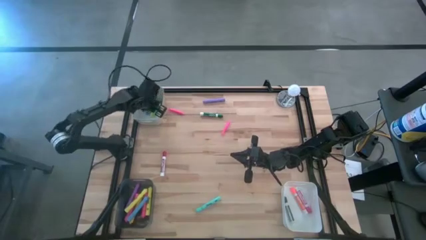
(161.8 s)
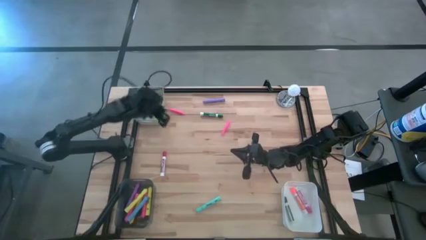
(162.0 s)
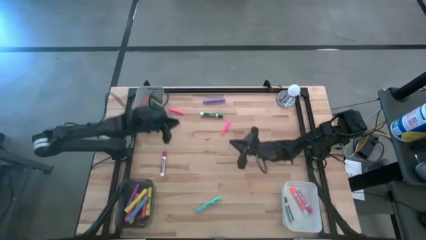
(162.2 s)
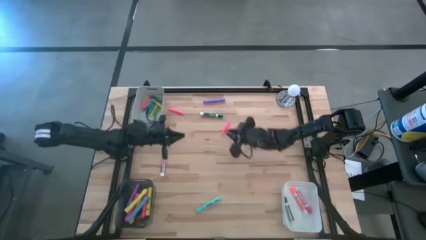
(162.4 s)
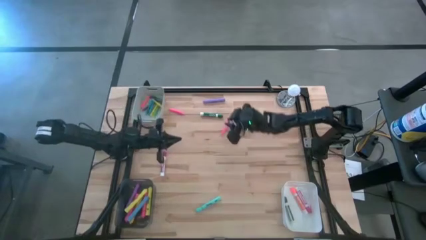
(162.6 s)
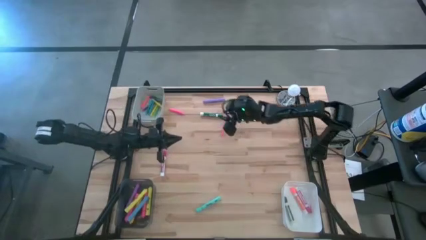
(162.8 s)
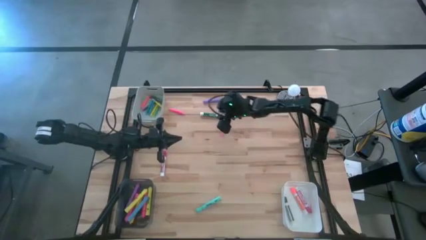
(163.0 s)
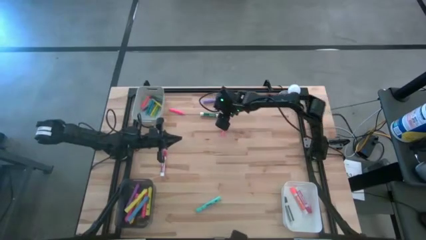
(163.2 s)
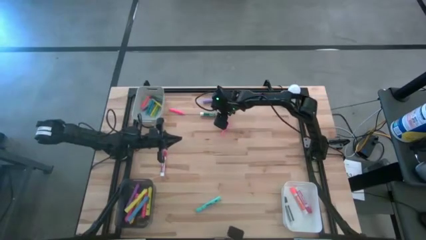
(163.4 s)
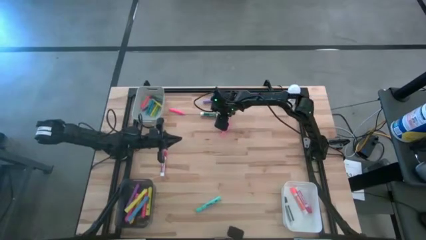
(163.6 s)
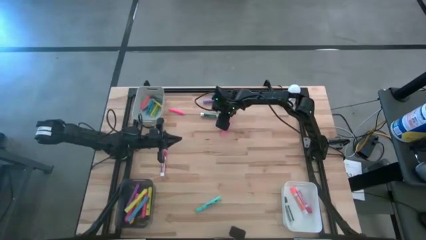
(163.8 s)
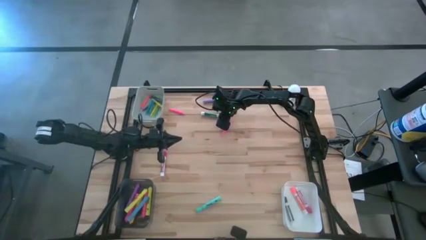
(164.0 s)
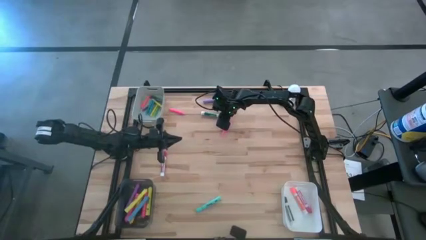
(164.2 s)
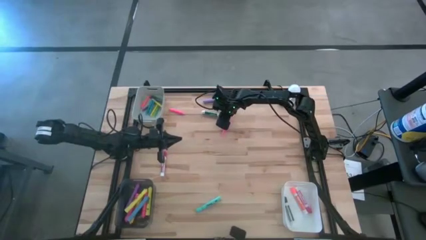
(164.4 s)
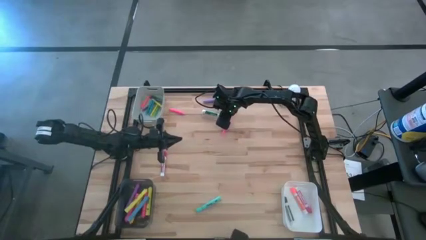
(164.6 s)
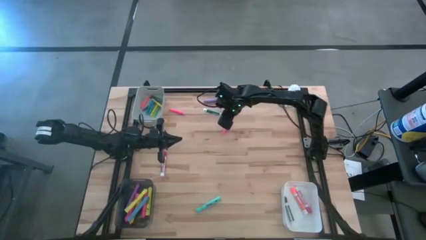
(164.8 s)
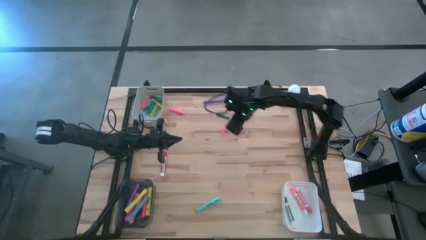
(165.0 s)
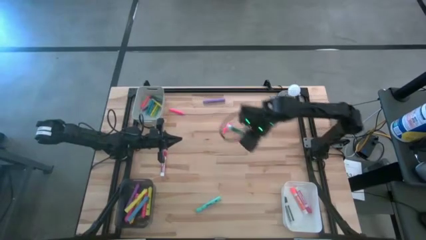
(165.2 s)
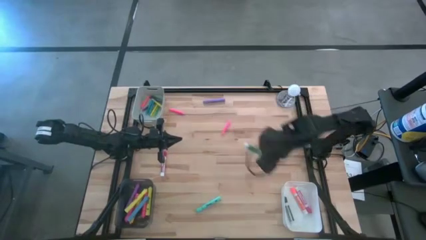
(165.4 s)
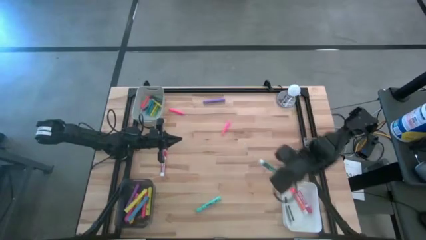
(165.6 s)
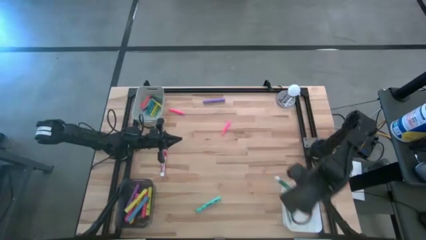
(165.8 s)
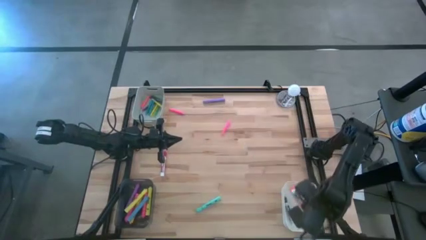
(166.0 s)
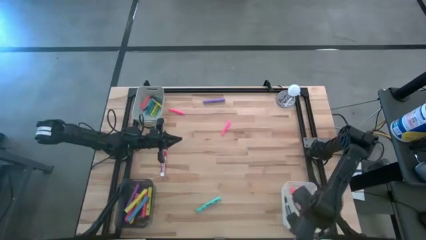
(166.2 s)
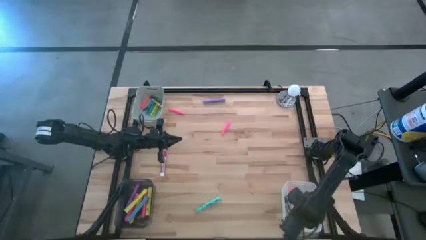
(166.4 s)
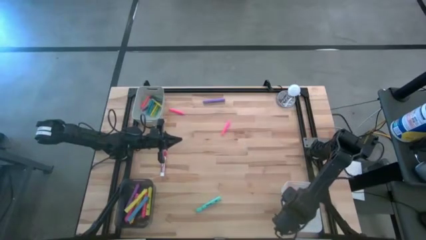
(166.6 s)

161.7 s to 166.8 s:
Task: Pick & Place Markers
Put the green marker pen into the white bin

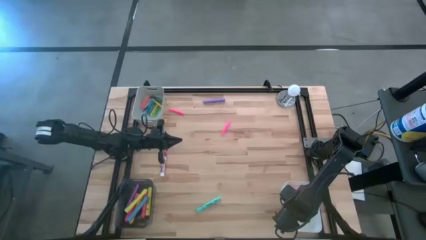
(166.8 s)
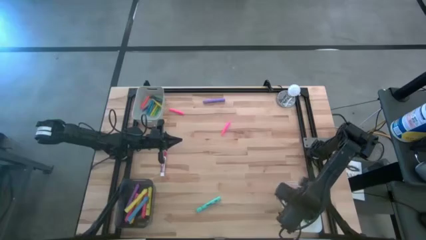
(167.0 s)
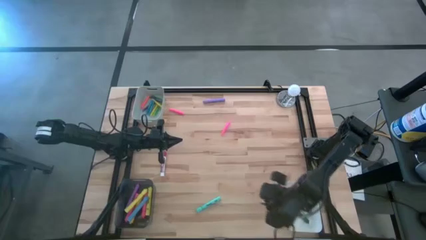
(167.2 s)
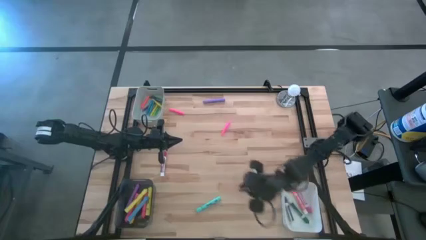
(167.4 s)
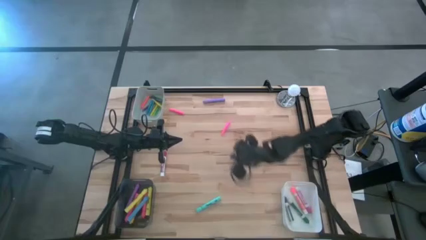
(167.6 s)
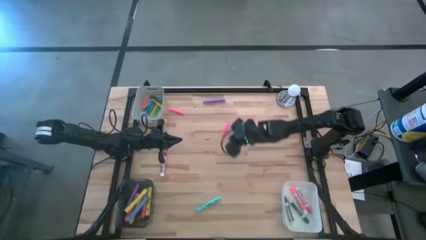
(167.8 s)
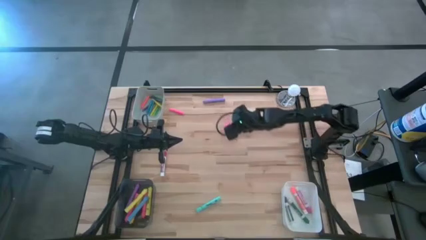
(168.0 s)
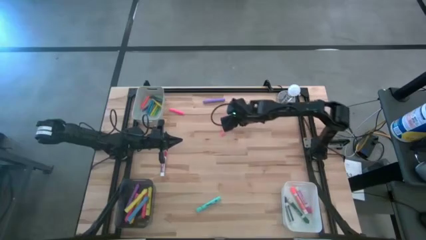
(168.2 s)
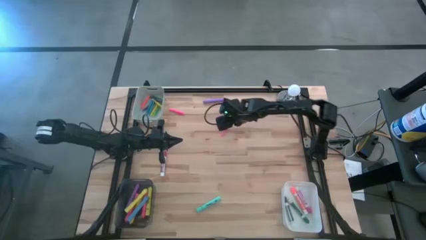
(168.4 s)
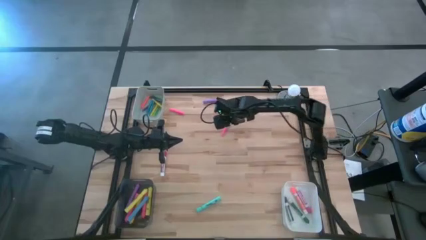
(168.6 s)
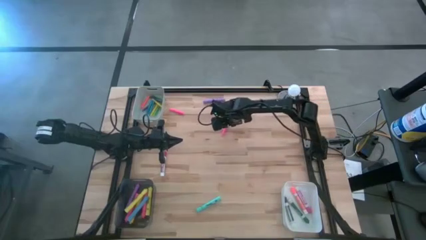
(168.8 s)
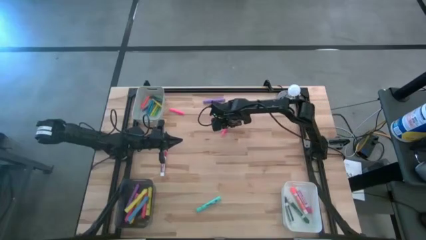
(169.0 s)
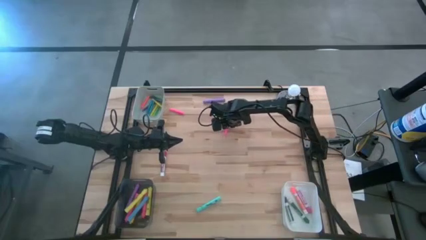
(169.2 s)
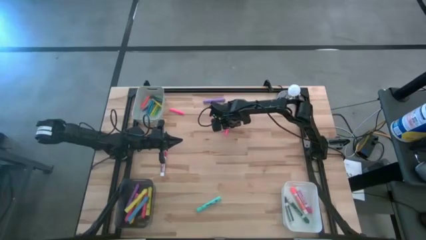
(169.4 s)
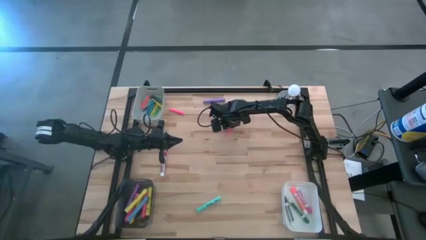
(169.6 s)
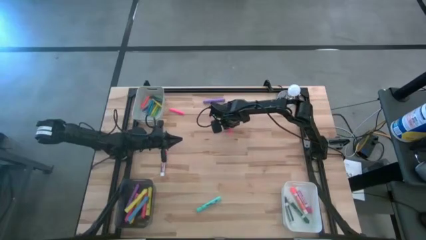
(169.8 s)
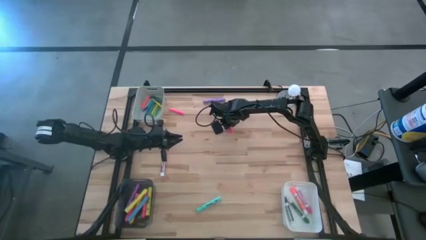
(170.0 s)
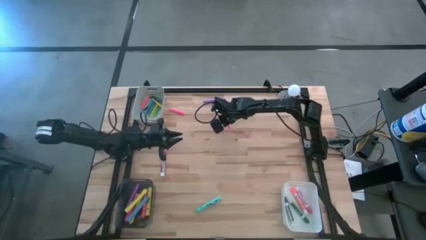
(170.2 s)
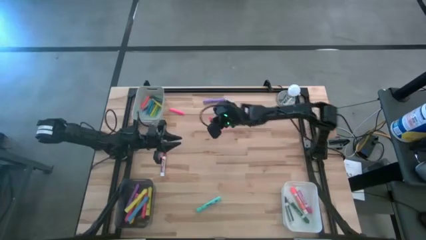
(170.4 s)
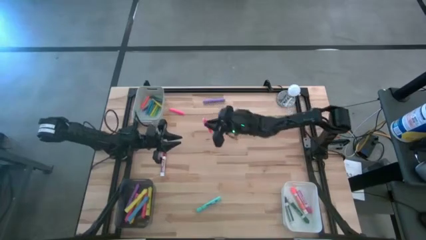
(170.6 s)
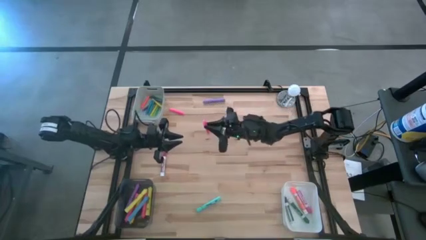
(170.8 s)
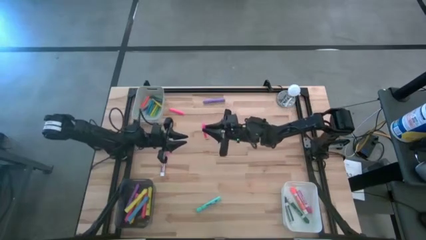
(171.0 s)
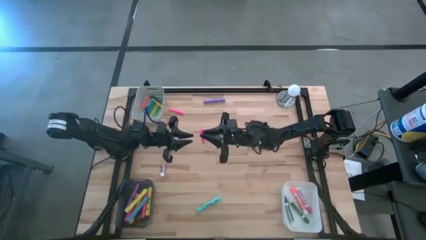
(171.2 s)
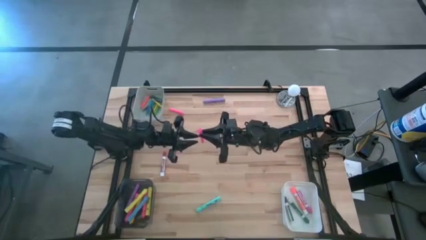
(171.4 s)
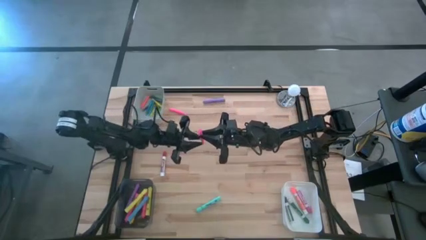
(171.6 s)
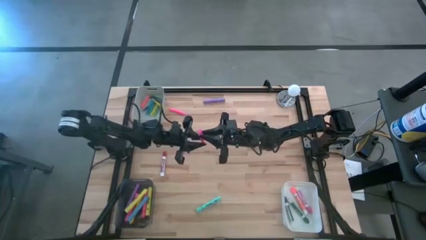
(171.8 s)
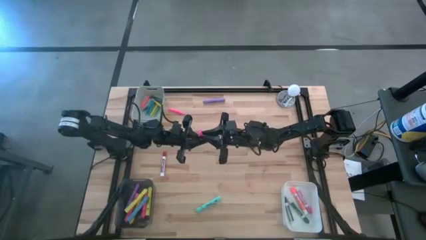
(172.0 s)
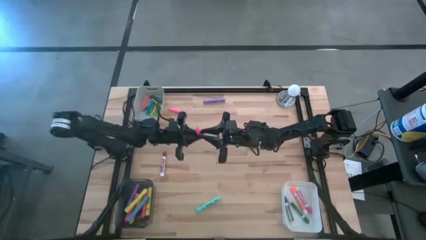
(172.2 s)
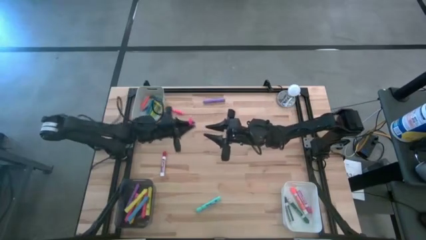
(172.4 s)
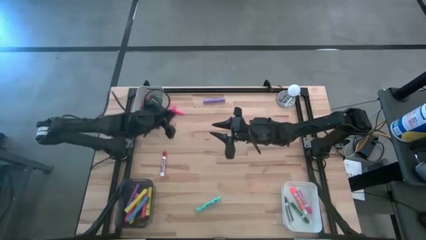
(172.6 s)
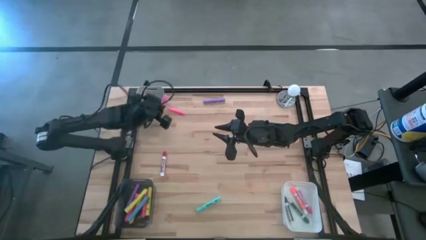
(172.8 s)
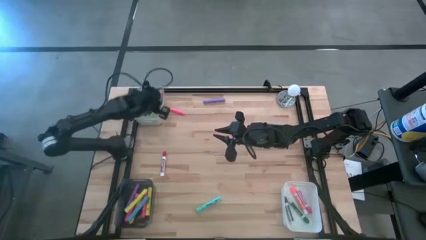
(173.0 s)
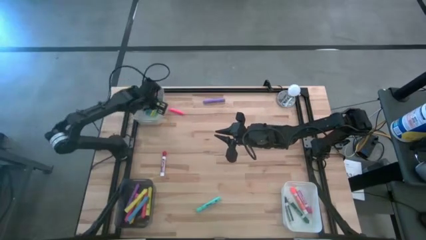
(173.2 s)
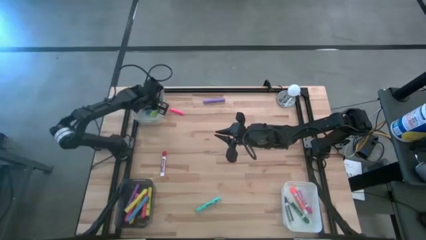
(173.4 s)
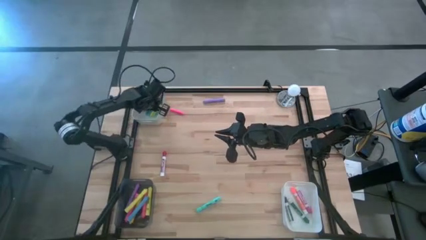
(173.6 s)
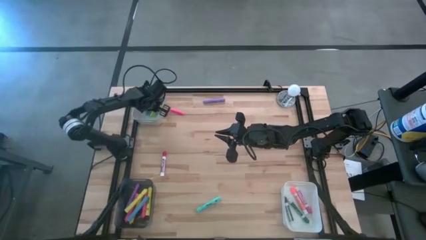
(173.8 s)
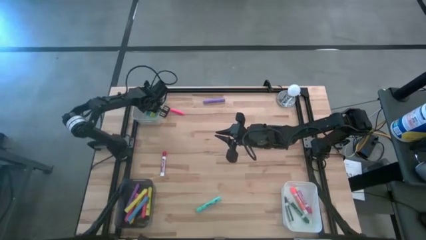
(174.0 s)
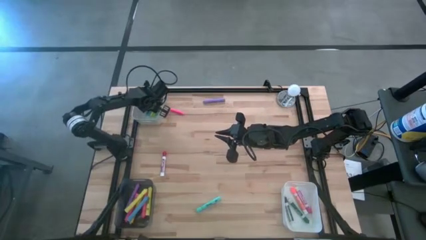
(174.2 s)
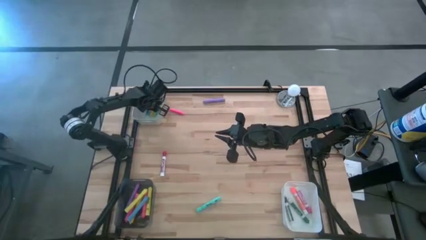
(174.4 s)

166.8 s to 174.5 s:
Put the pink pen into the gray bin

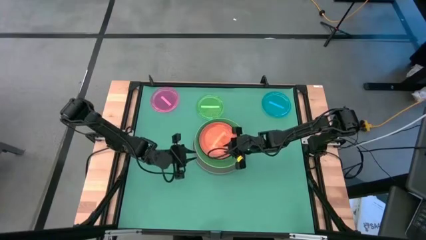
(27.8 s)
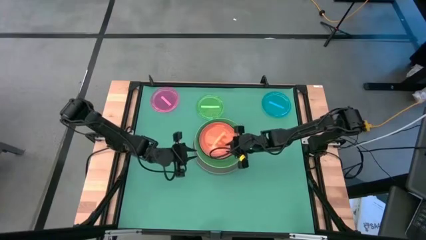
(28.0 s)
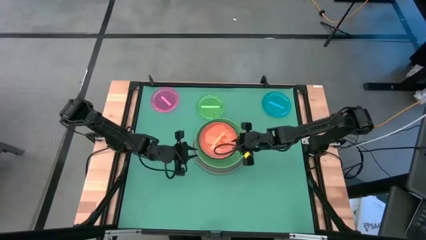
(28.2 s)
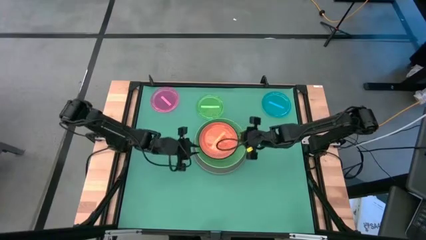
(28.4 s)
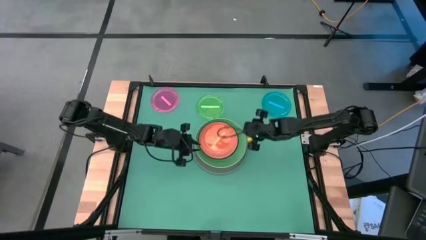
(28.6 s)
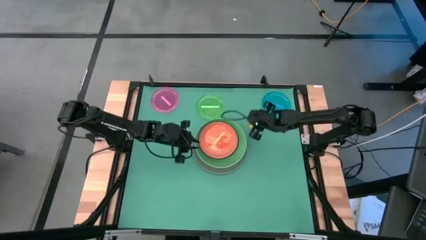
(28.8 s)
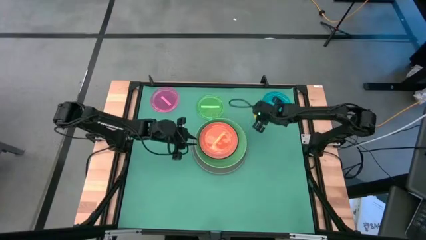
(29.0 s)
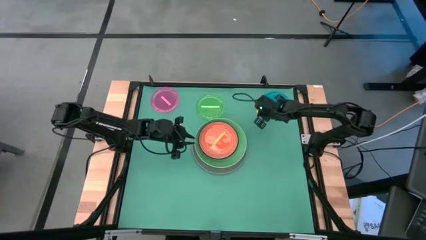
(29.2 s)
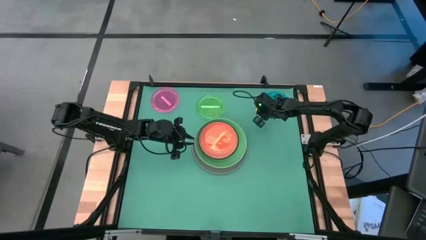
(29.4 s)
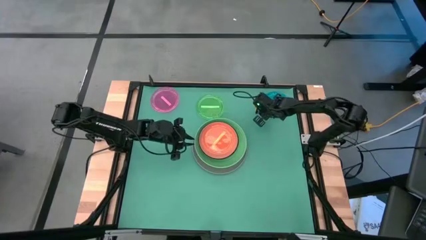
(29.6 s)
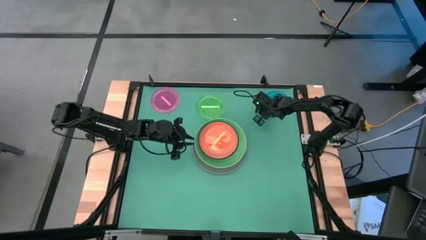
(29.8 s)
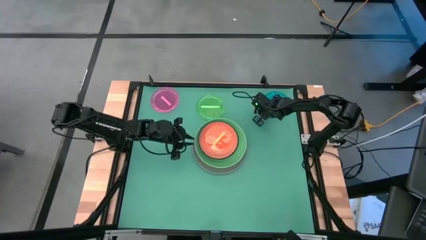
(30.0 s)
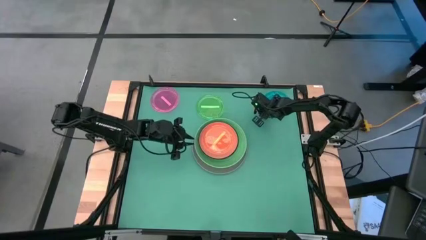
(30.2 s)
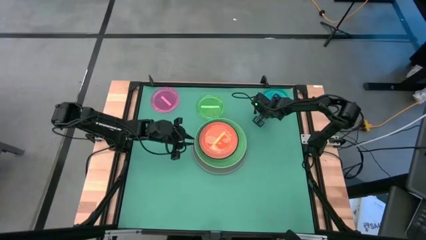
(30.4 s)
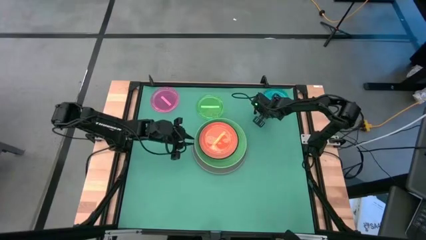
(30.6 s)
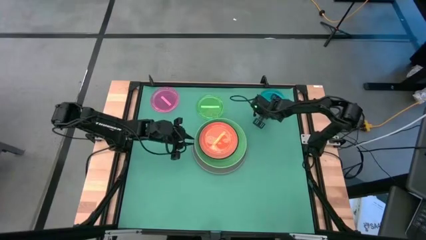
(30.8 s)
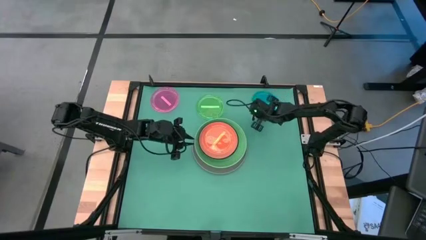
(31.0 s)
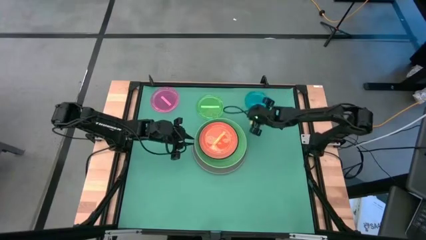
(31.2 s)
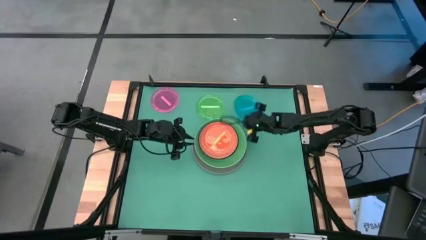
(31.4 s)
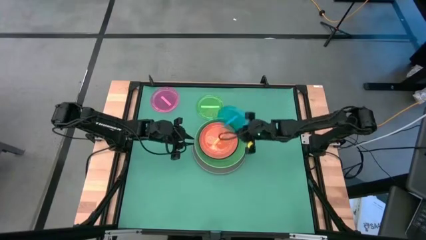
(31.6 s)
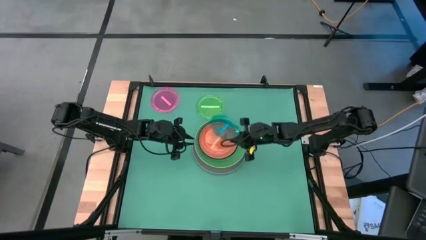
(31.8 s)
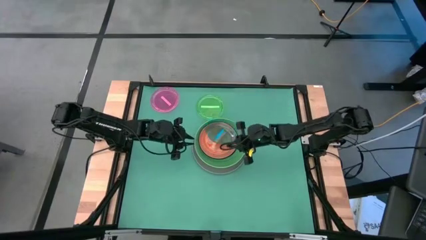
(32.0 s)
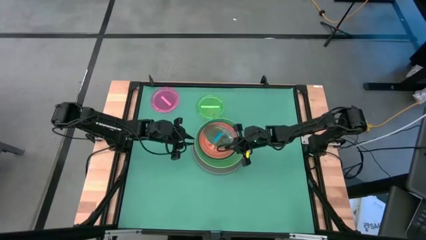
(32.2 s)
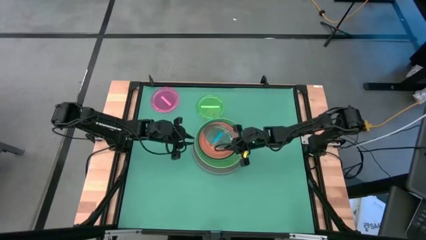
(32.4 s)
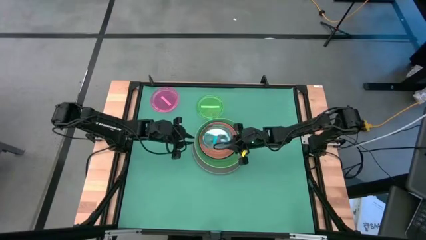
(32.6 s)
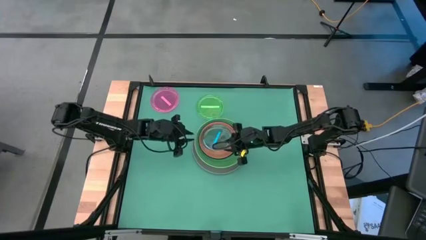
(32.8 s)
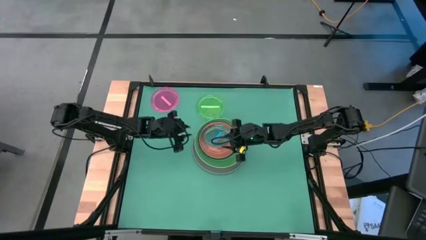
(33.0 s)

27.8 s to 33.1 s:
Task: Stack plastic plates
Stack the blue plate on top of the orange plate
